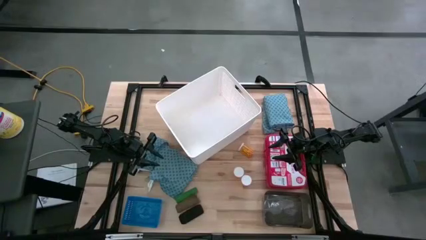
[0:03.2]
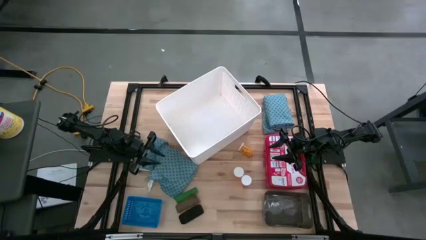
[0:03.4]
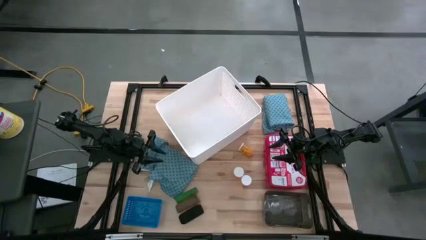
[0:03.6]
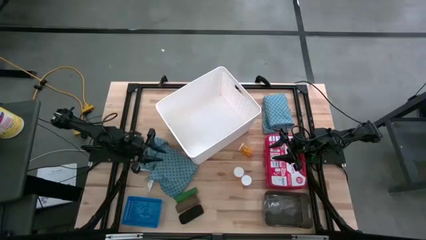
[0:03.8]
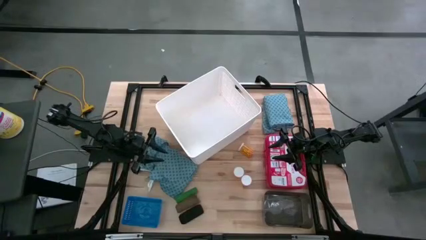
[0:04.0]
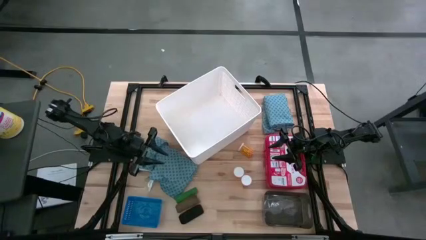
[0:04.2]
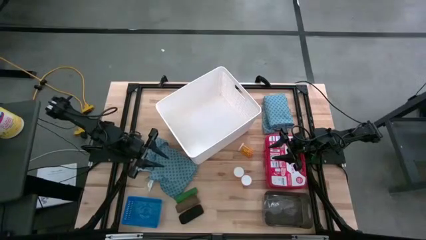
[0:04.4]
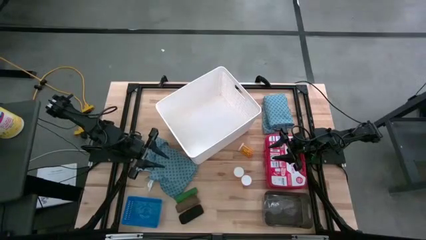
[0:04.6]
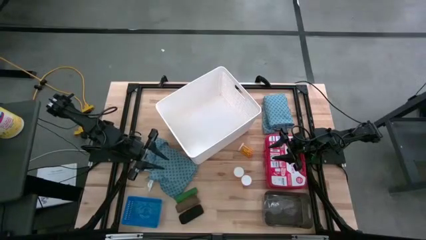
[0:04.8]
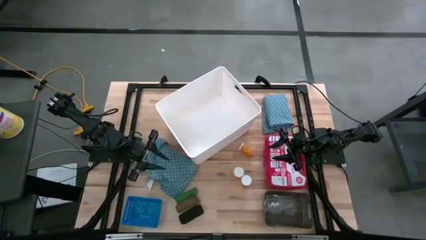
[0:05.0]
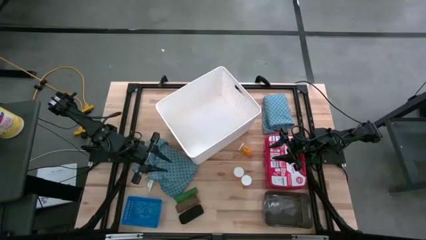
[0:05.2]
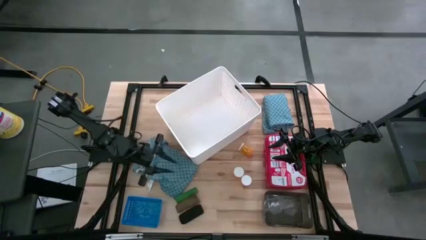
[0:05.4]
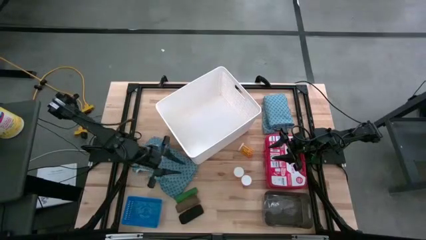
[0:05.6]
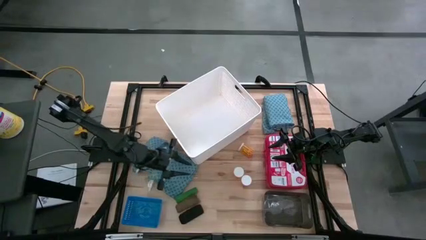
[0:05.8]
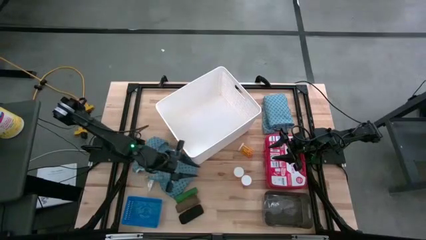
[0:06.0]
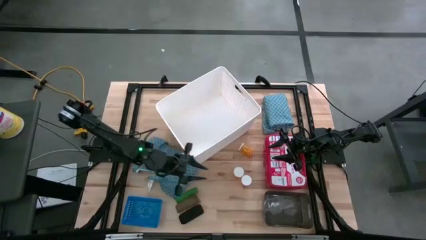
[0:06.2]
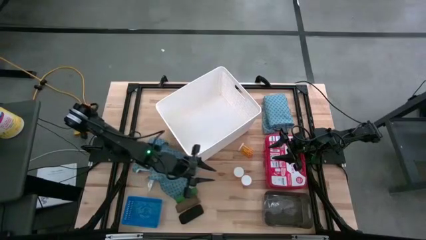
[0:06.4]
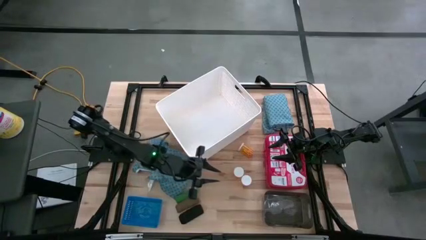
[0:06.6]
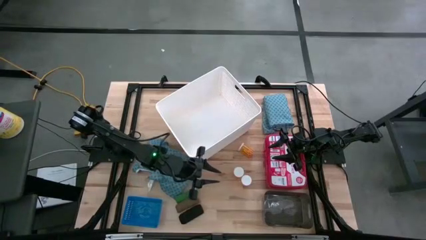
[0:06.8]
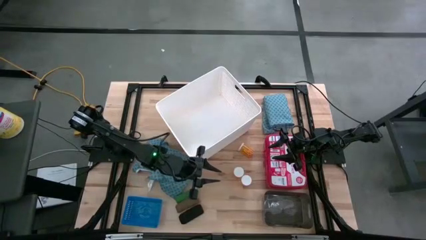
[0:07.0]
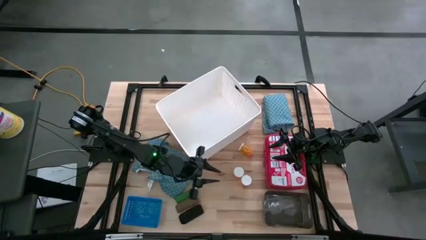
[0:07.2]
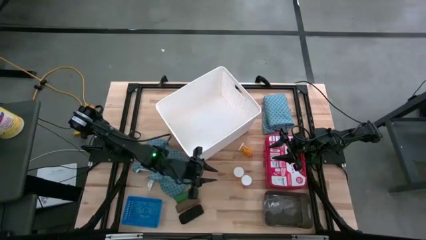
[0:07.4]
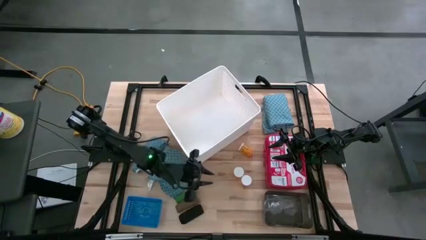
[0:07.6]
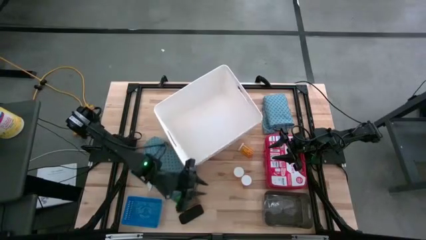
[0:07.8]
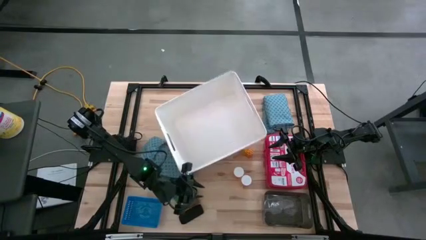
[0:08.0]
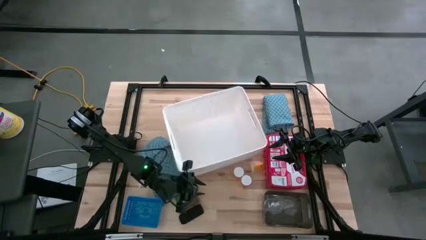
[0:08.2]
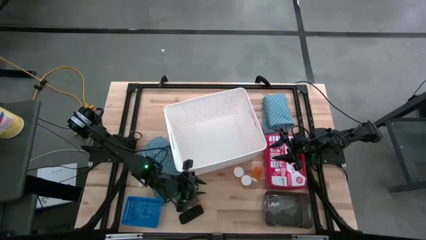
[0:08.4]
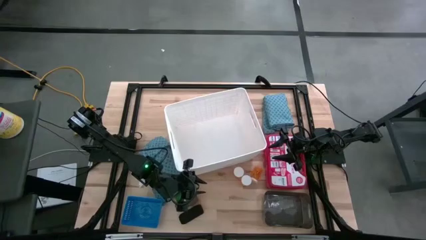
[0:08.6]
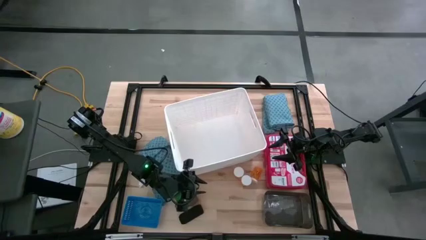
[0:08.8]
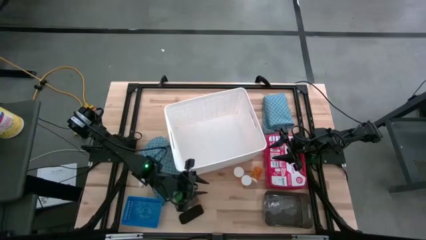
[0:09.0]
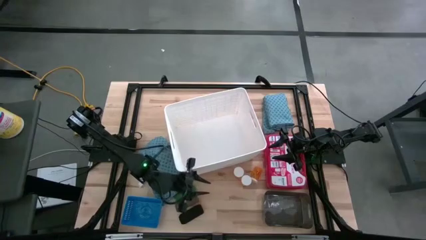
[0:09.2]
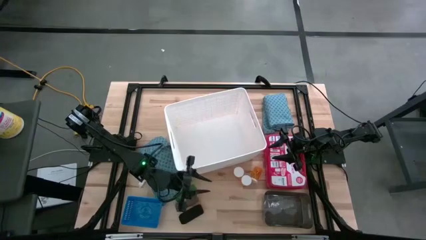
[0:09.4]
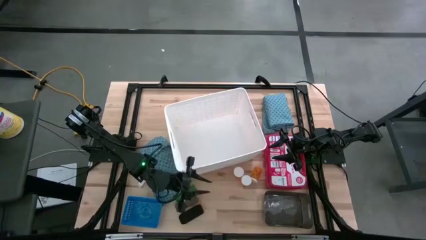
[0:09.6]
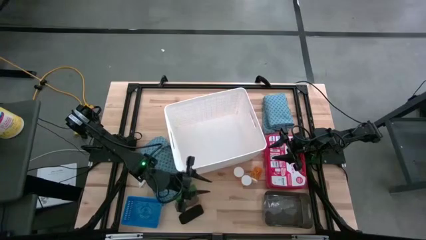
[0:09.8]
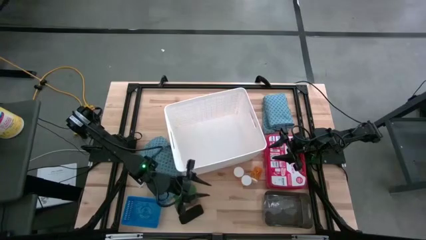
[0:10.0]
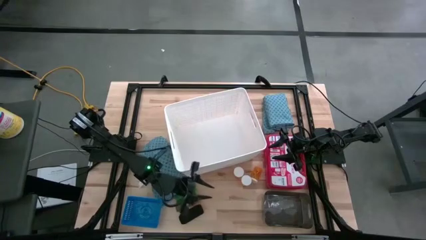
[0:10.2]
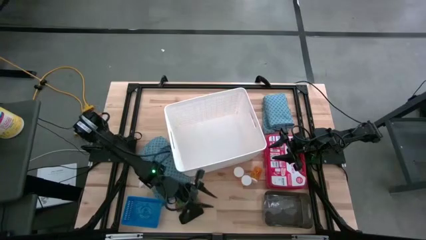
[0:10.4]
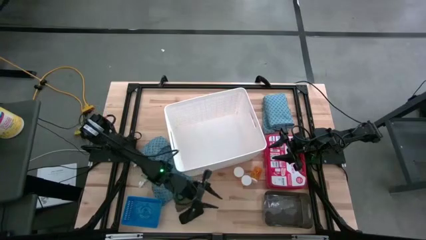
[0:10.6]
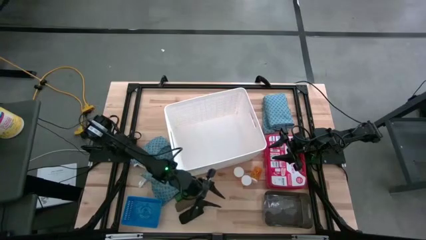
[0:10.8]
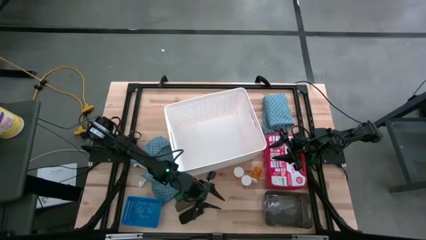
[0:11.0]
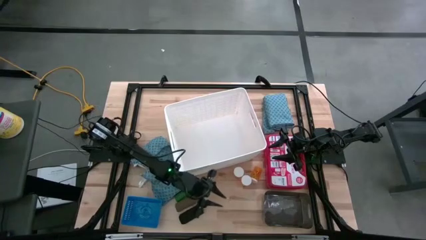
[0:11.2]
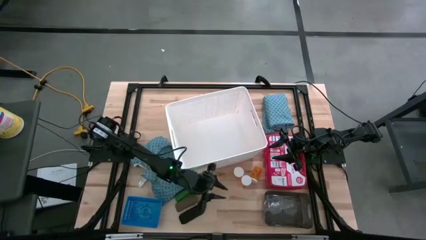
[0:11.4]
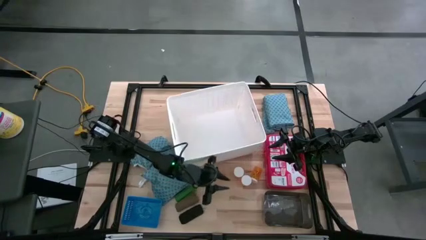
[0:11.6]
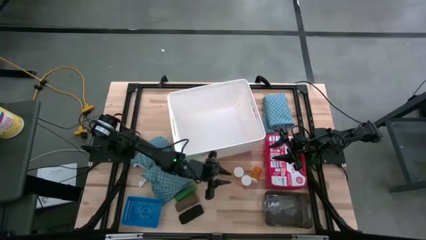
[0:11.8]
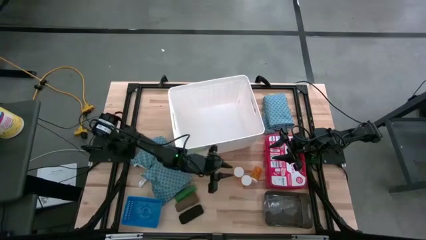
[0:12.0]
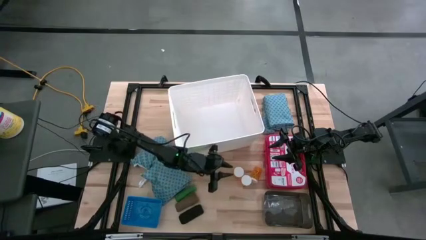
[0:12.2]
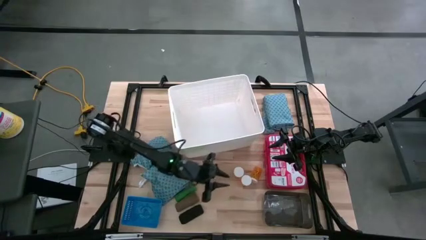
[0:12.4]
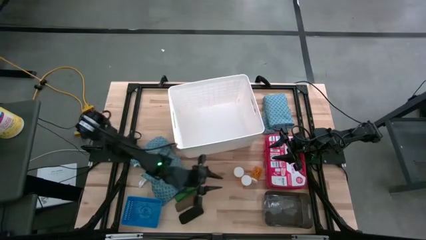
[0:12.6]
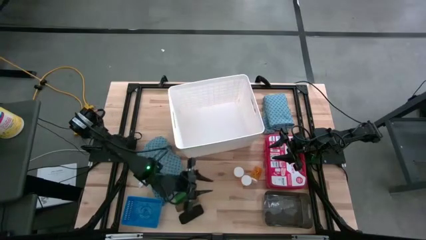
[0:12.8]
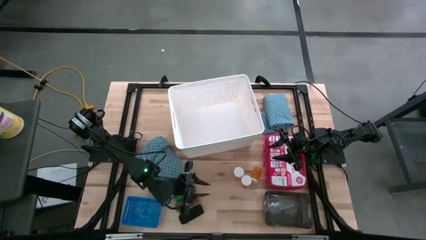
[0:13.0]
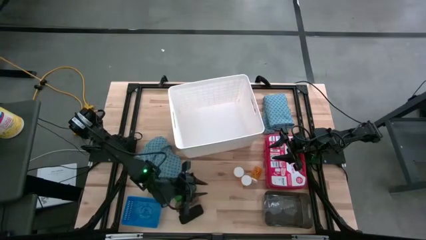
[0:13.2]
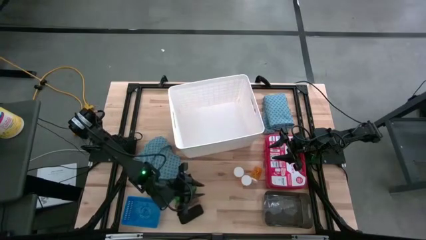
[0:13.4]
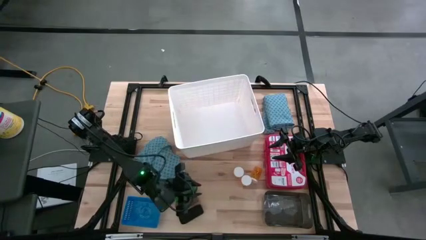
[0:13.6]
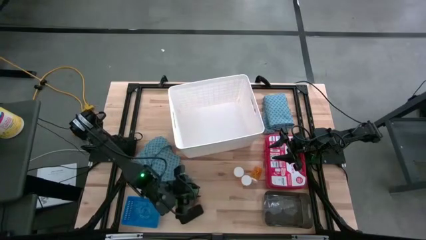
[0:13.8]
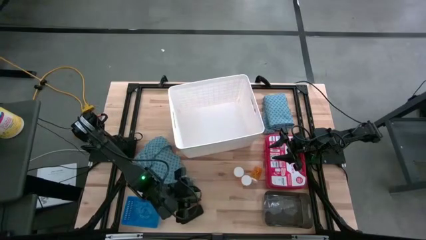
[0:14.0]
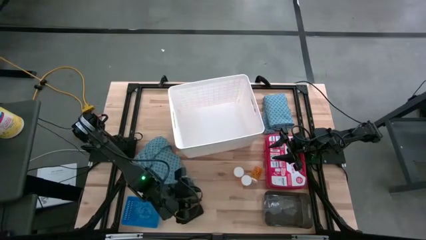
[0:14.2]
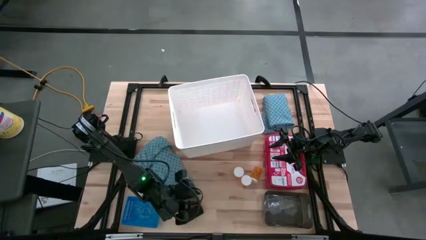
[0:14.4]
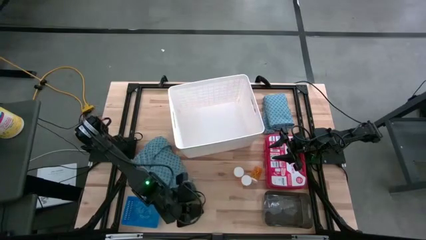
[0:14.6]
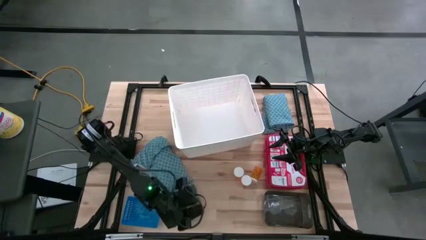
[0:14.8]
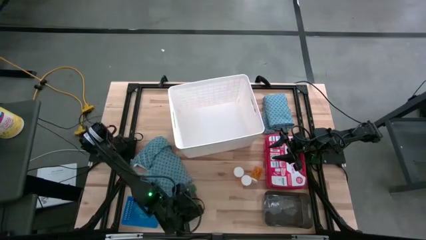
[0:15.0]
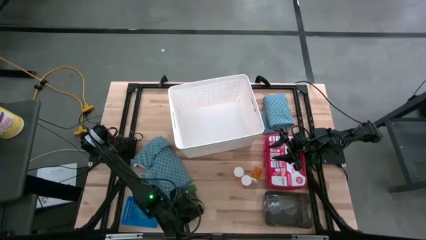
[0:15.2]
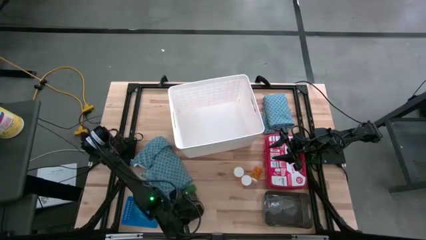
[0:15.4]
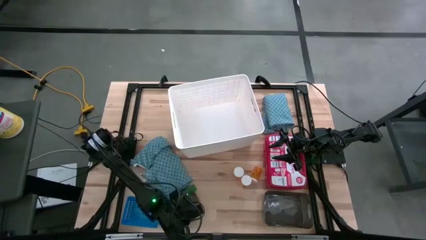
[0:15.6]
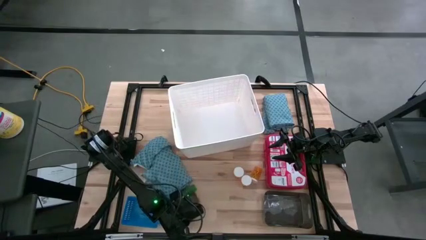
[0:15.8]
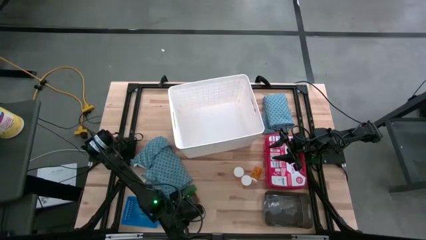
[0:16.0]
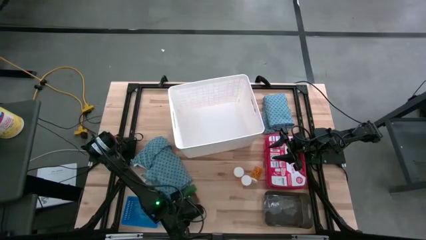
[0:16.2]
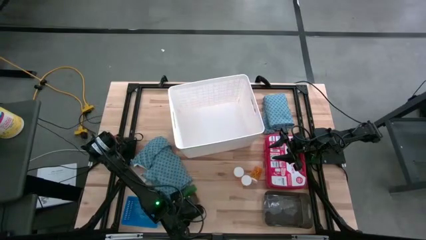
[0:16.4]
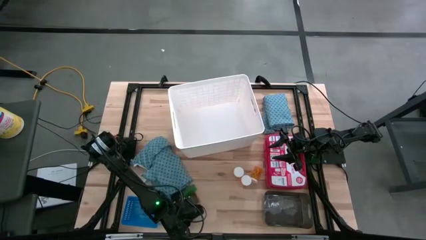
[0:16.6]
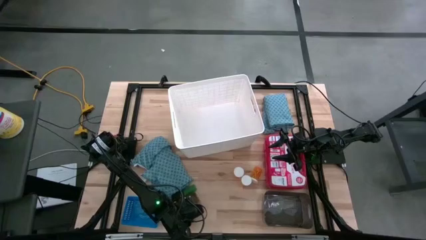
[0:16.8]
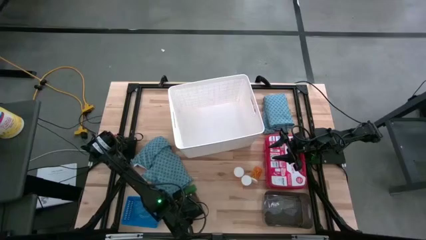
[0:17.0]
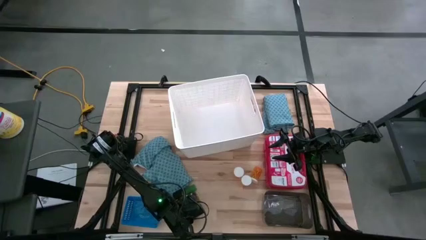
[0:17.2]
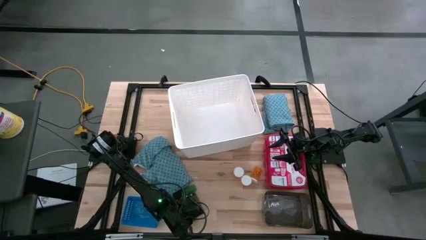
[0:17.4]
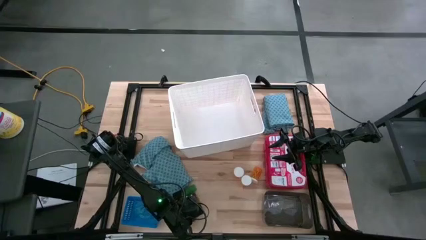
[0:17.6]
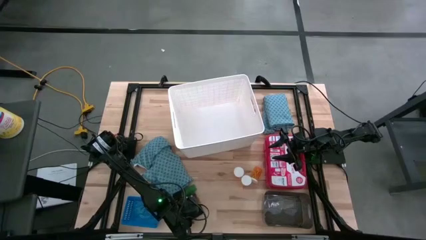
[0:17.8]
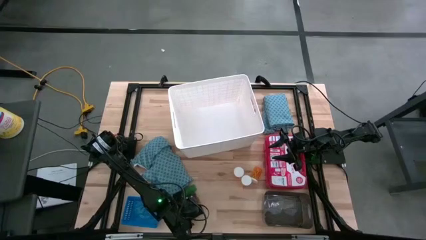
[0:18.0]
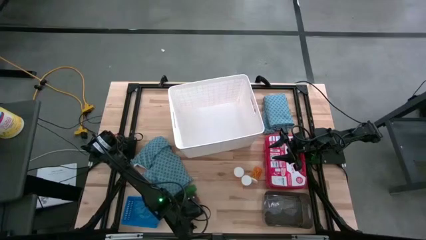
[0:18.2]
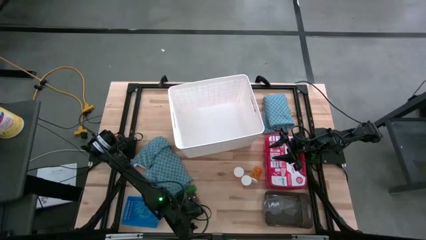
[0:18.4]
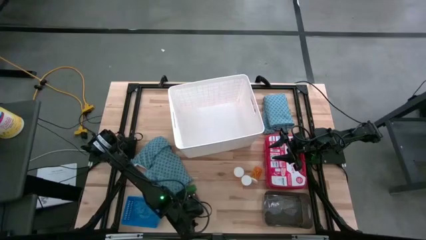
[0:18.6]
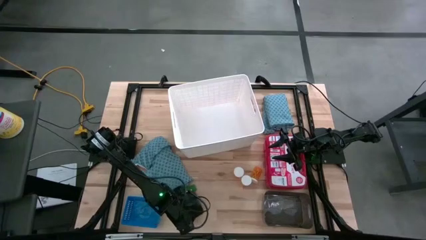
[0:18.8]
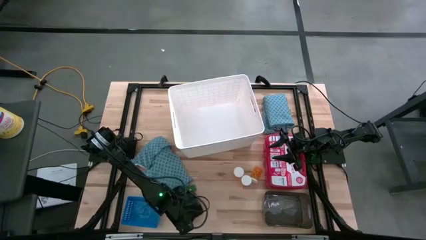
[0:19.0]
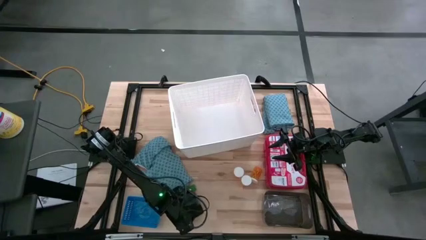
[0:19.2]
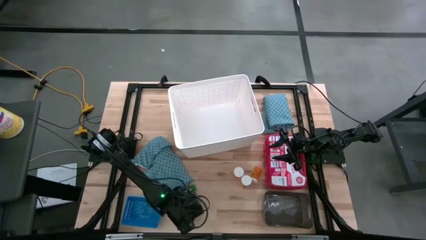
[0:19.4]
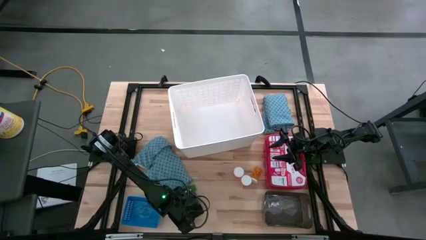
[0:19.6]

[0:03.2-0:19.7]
Task: Pick & place medical supplies in basket/bin
Put the black bandage into the black bin
